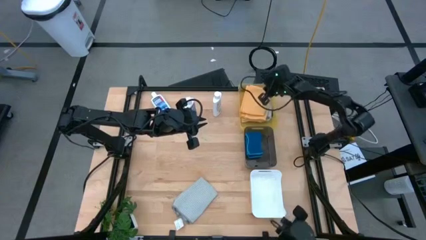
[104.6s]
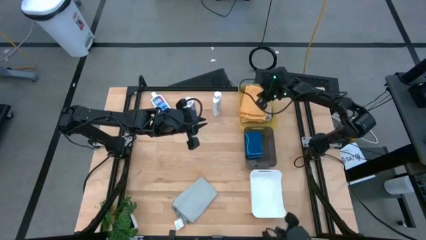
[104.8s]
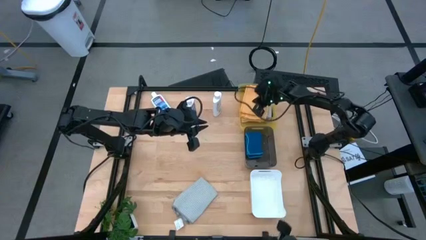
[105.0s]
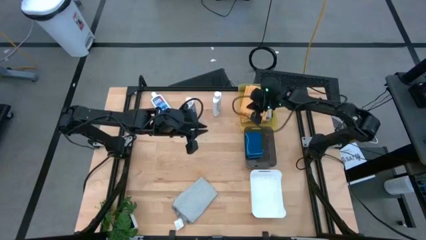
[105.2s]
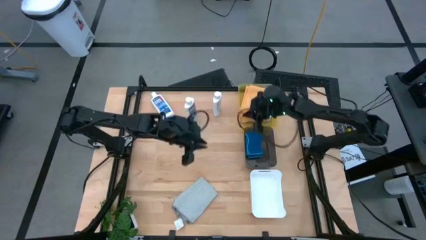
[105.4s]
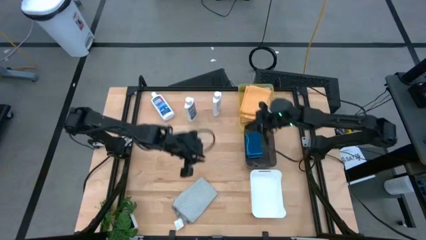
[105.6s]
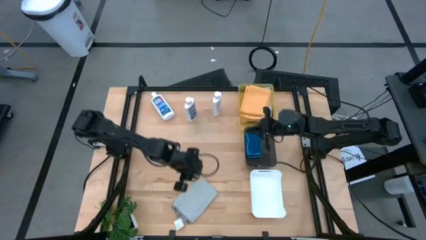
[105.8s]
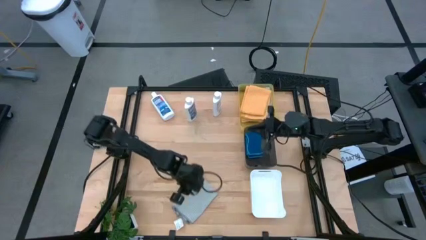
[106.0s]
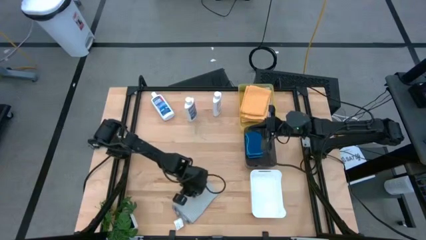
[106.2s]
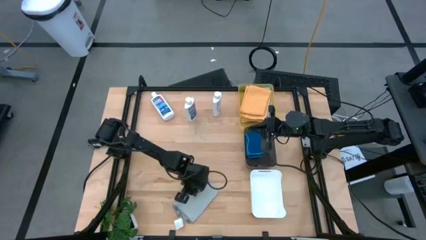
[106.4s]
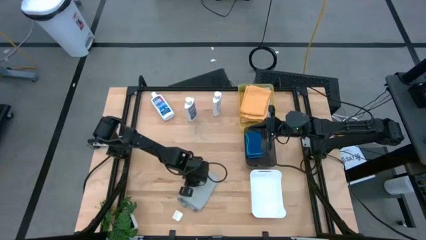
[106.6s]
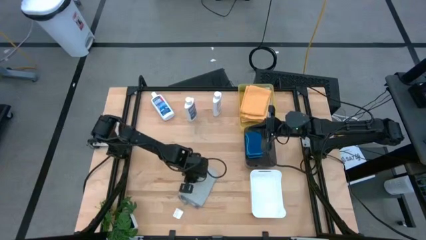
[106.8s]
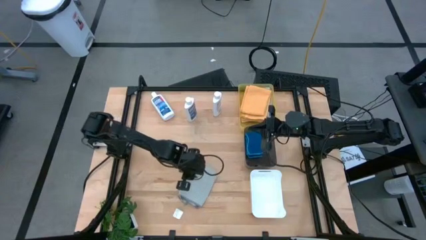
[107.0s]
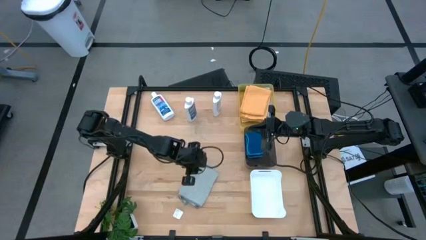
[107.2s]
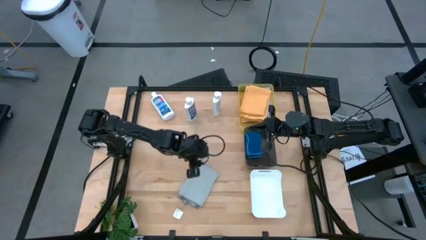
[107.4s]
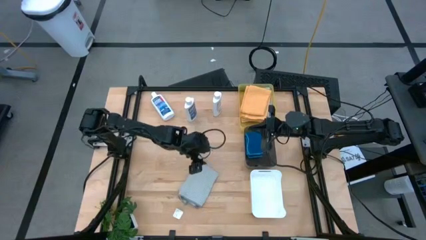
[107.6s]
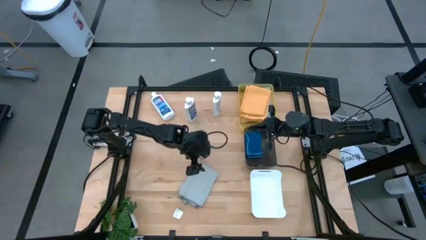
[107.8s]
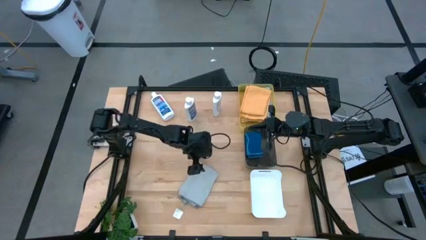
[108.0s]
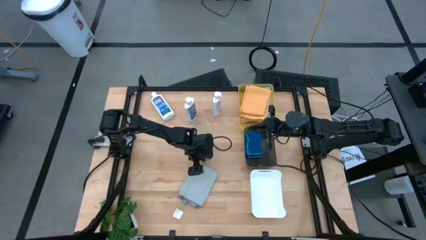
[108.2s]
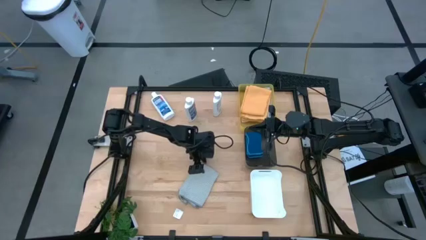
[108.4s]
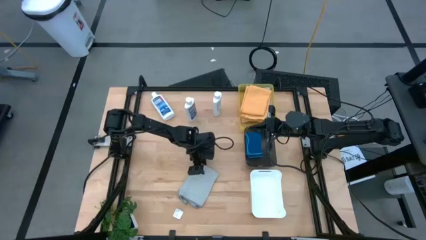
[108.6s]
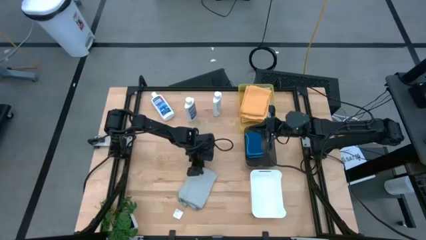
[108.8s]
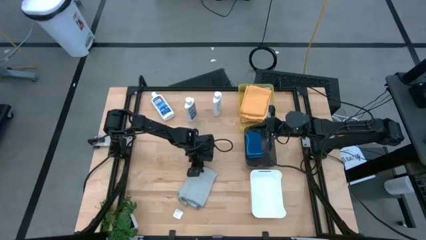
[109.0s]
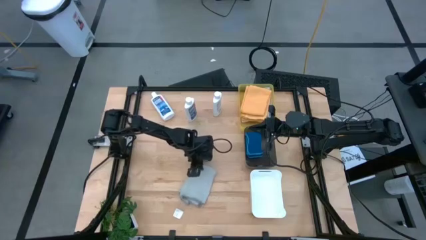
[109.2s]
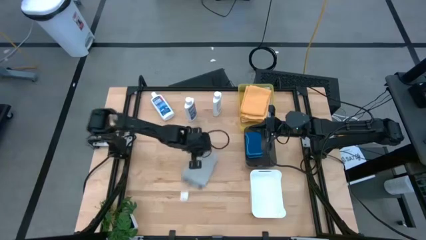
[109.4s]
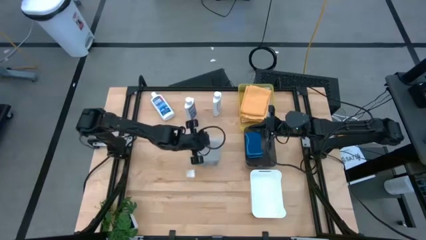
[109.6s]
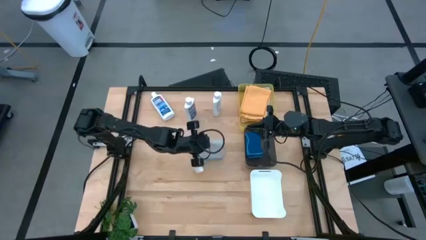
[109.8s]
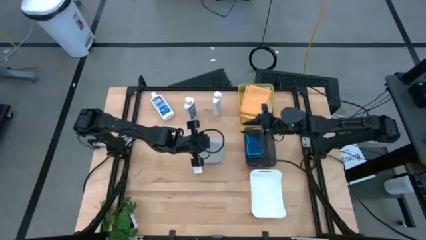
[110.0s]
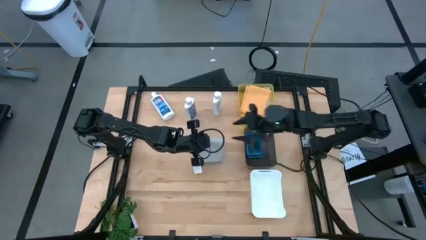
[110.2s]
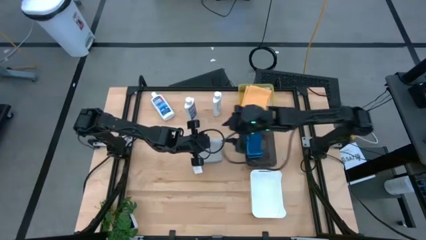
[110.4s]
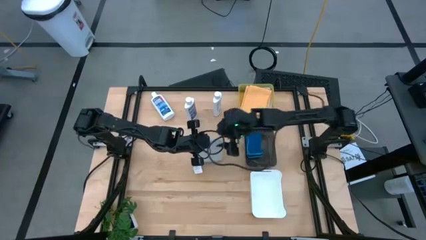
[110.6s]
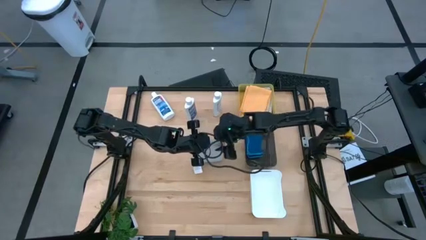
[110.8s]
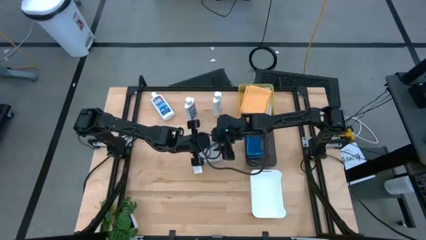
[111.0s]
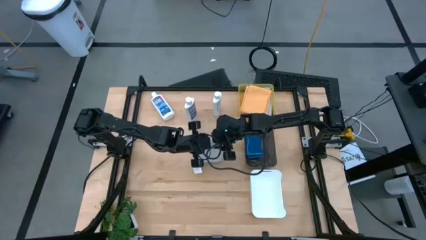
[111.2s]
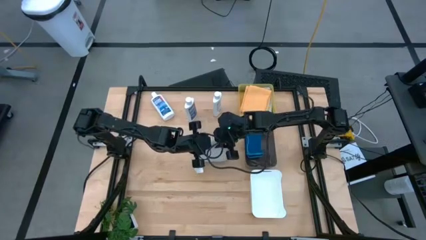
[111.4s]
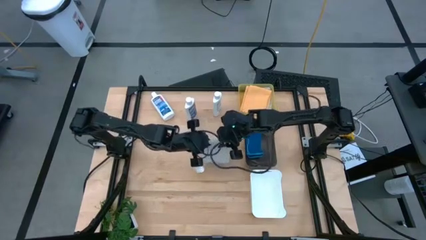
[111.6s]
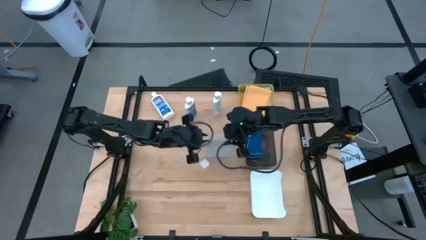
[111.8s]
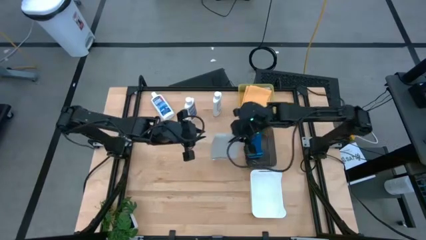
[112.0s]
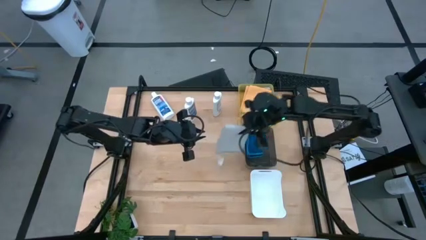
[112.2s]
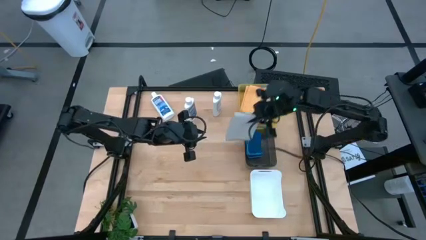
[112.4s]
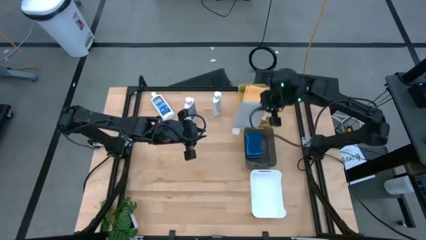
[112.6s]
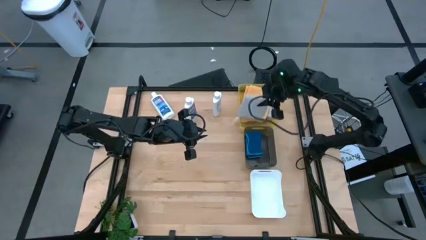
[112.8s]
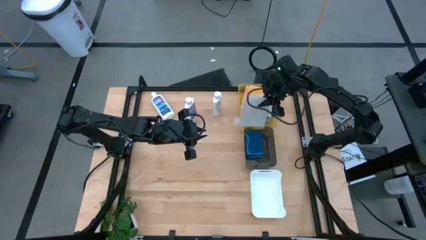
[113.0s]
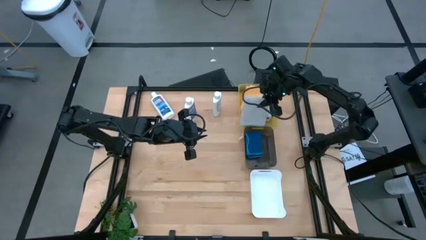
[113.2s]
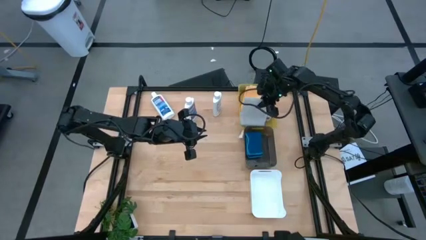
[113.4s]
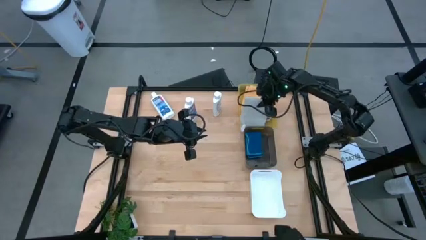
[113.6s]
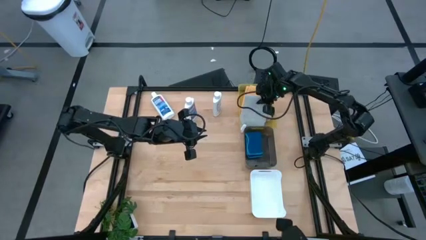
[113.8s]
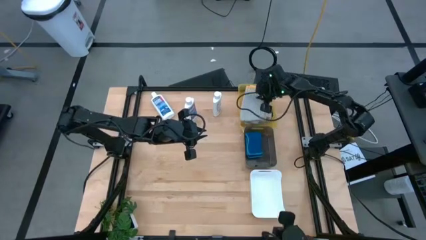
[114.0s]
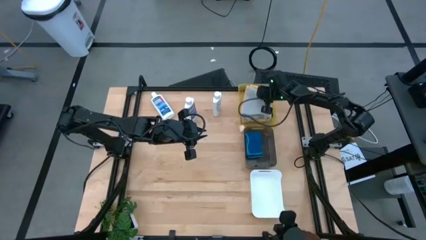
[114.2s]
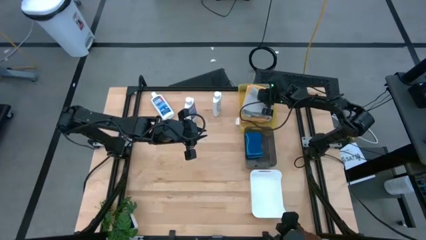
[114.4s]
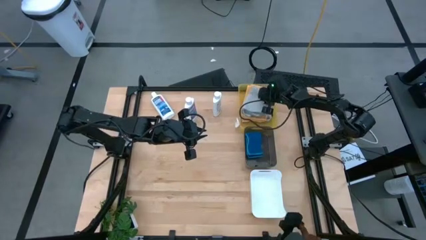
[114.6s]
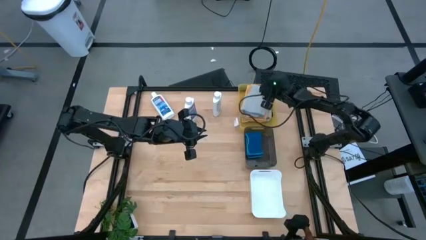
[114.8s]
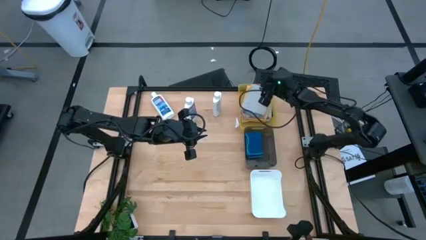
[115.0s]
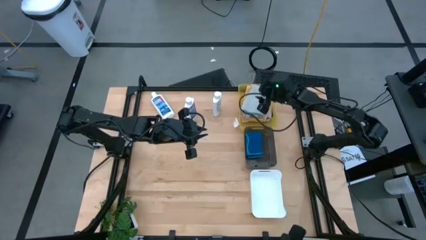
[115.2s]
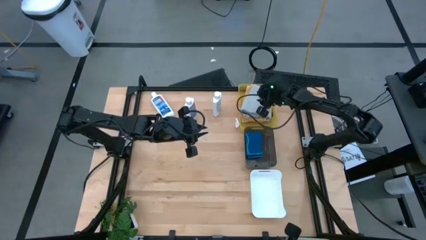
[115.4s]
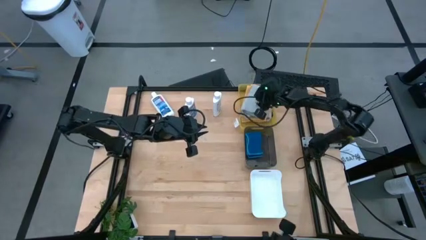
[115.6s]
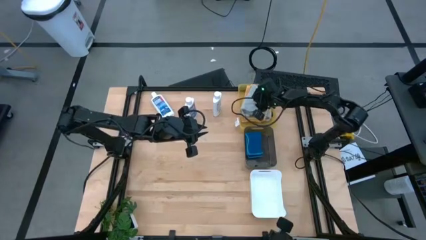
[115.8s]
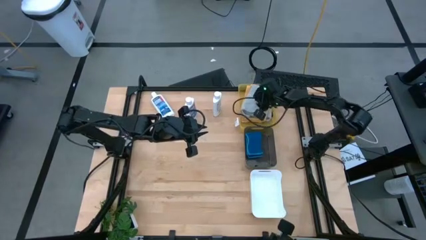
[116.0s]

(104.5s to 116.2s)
Task: Pick & Place Kitchen Items
Put the gray towel into the yellow bin

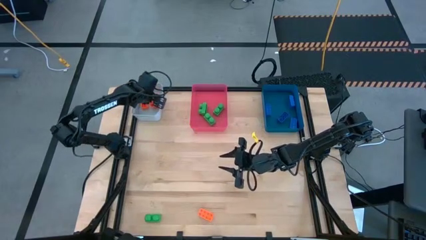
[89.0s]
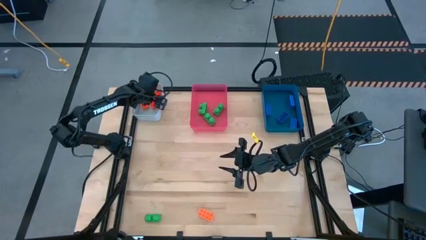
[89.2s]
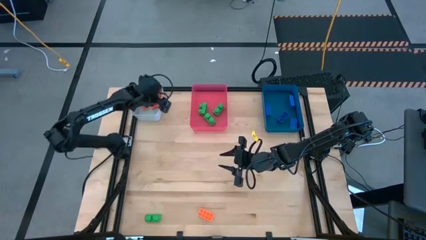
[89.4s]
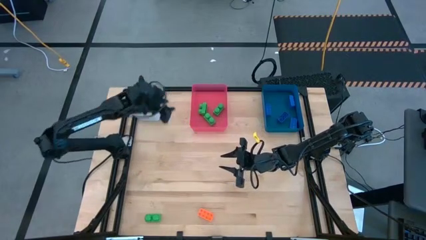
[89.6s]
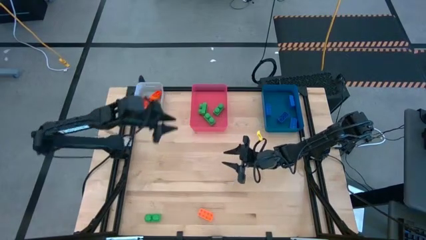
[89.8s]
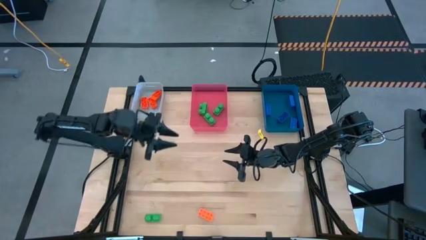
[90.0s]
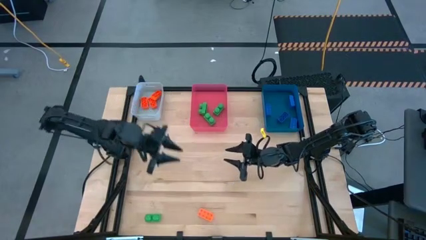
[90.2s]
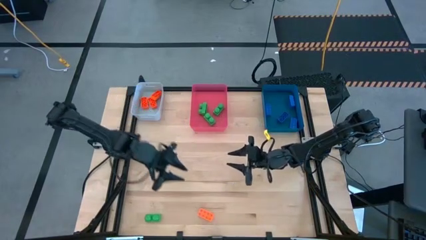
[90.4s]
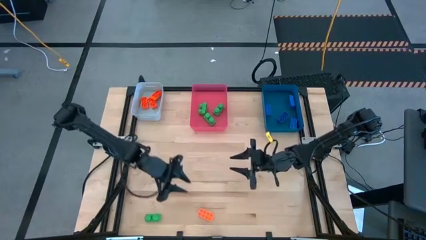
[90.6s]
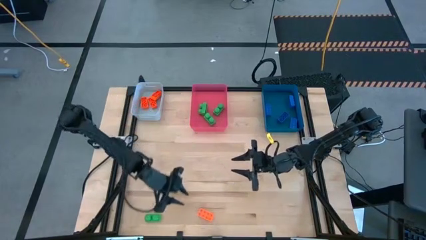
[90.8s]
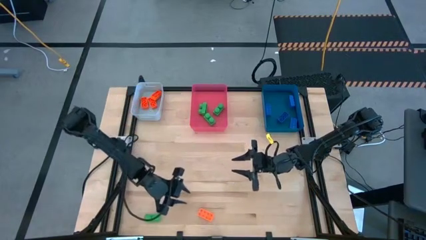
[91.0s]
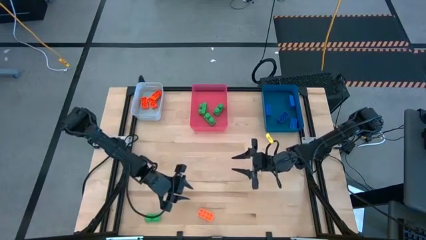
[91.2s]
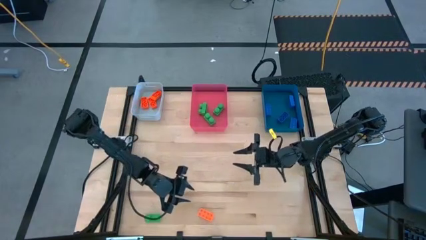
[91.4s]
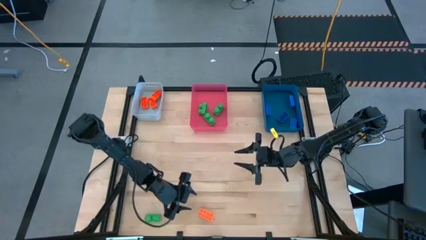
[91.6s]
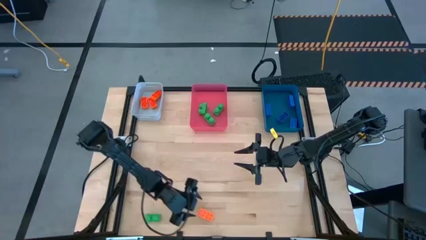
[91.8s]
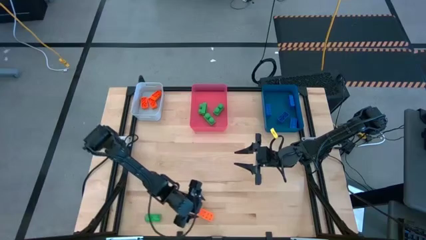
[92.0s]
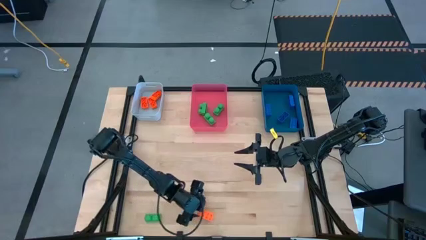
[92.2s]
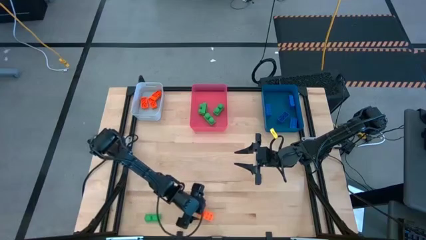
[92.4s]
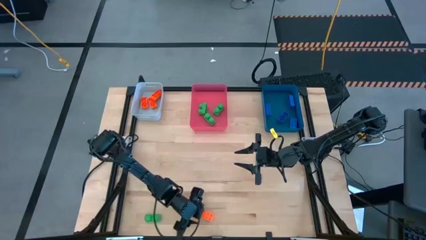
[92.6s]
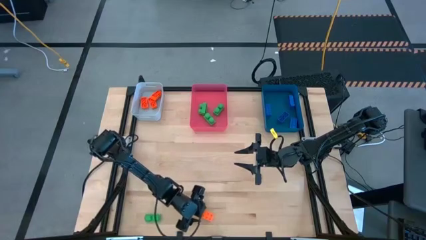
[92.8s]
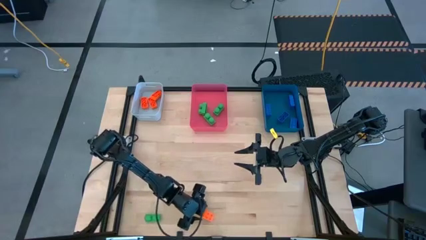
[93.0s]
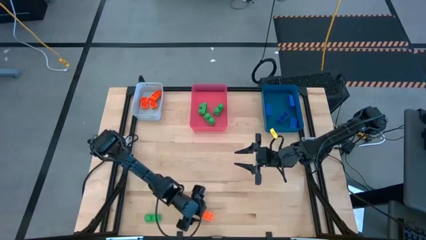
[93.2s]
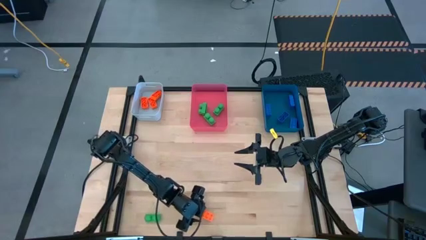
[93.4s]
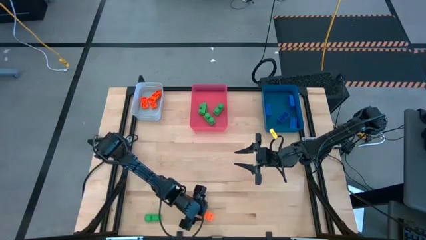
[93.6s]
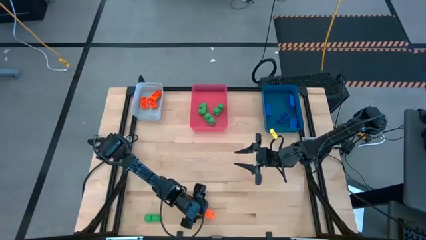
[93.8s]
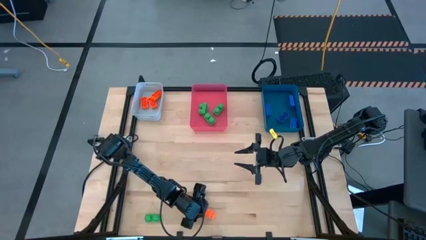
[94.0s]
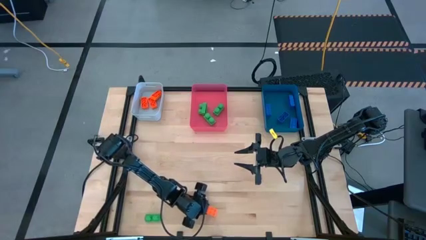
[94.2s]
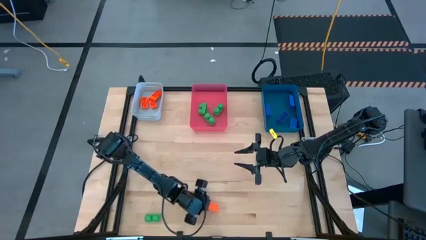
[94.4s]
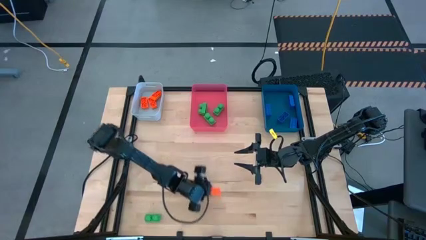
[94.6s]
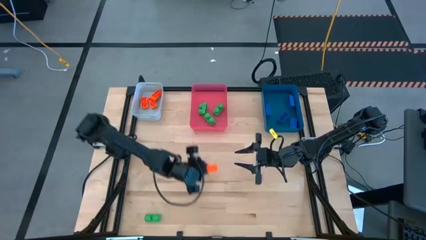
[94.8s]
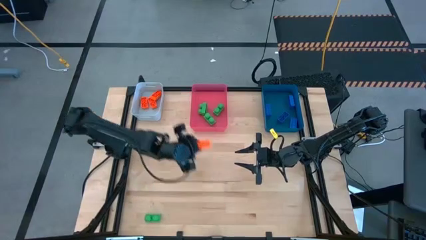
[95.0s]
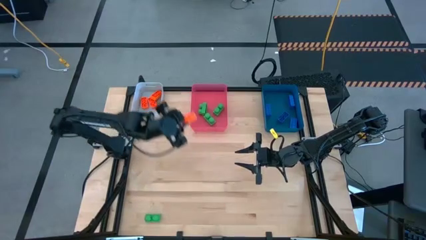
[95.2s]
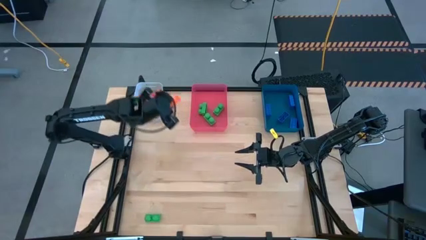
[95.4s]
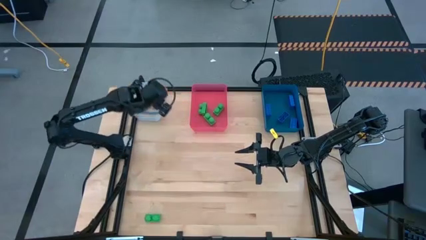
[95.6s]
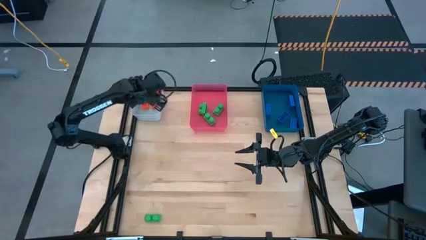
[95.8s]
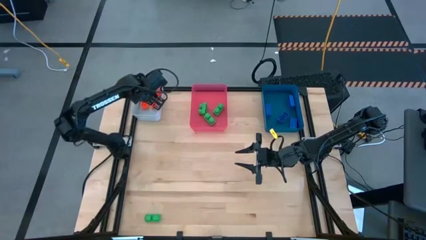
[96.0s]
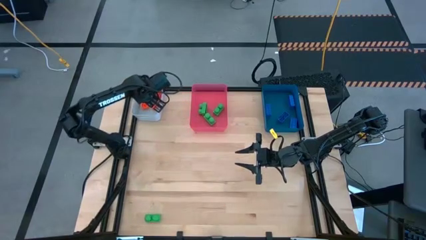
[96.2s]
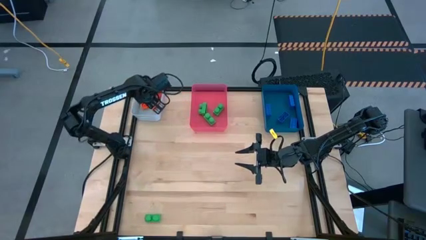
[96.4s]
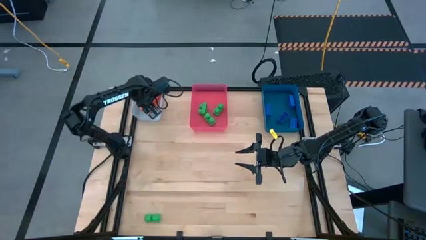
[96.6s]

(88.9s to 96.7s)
Task: Sort & place blocks by color
Put the orange game piece into the white bin
